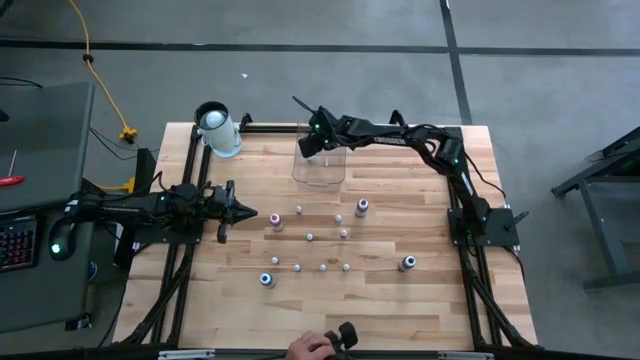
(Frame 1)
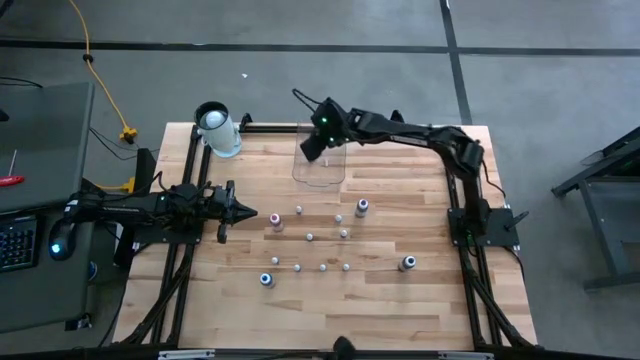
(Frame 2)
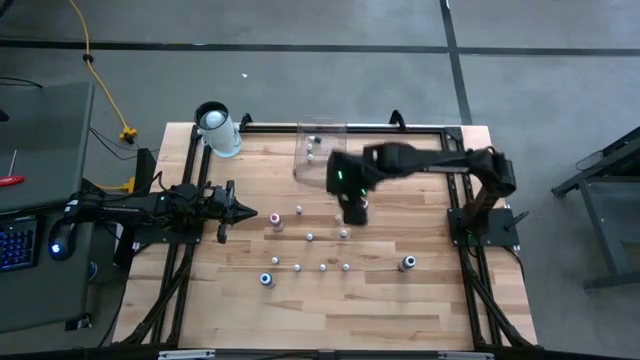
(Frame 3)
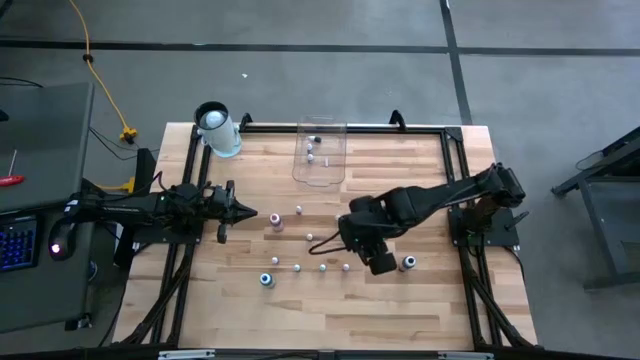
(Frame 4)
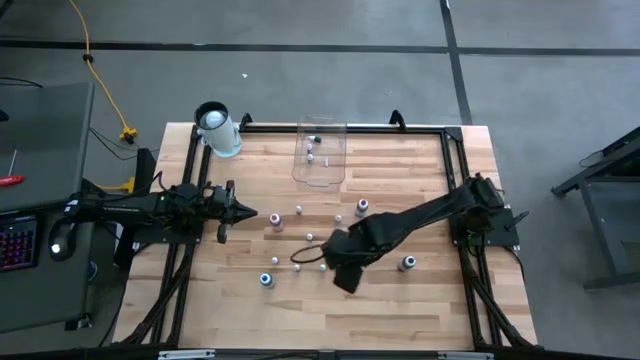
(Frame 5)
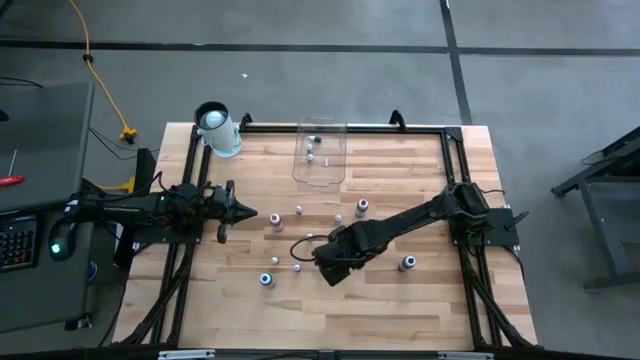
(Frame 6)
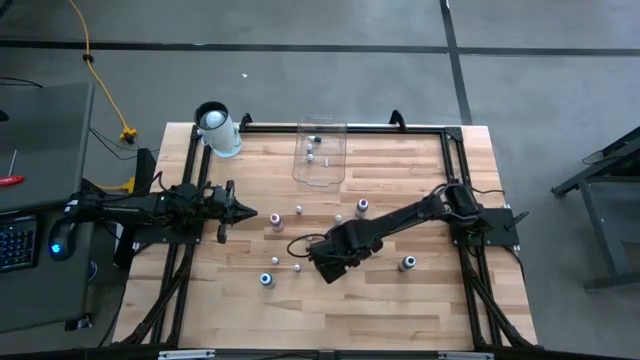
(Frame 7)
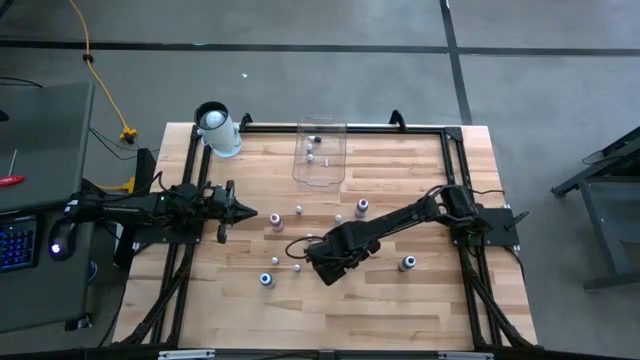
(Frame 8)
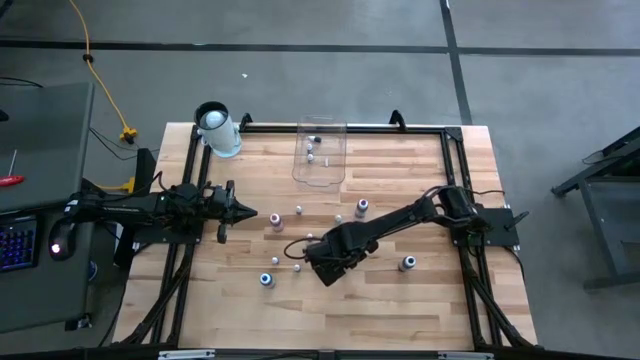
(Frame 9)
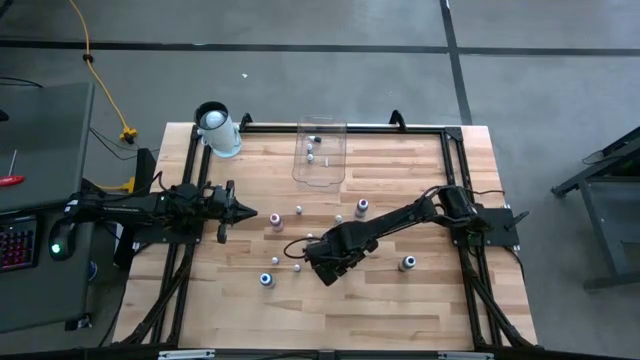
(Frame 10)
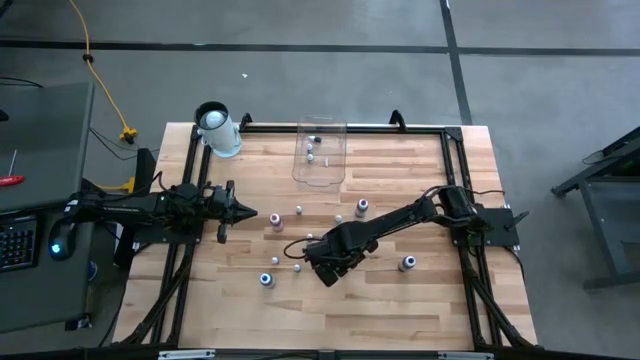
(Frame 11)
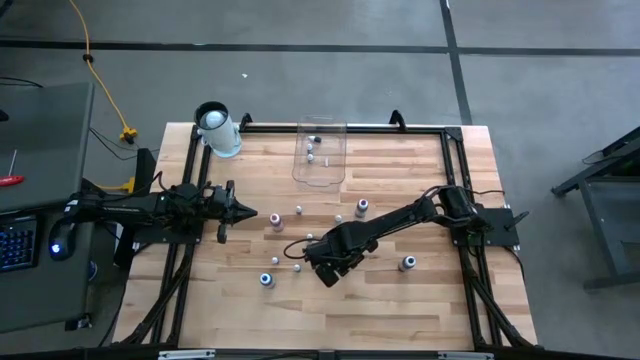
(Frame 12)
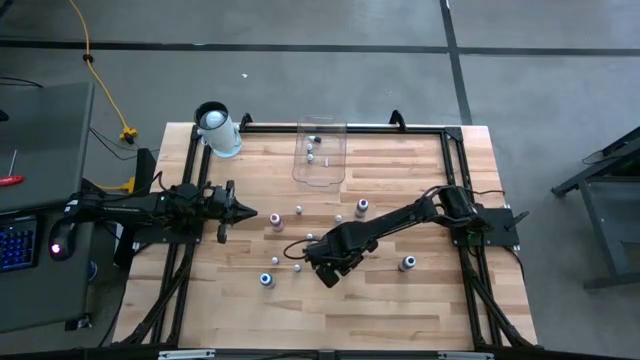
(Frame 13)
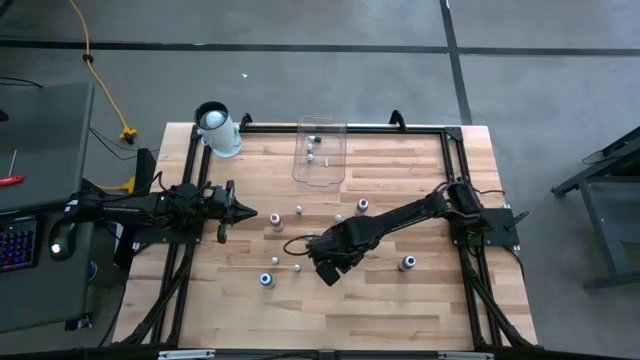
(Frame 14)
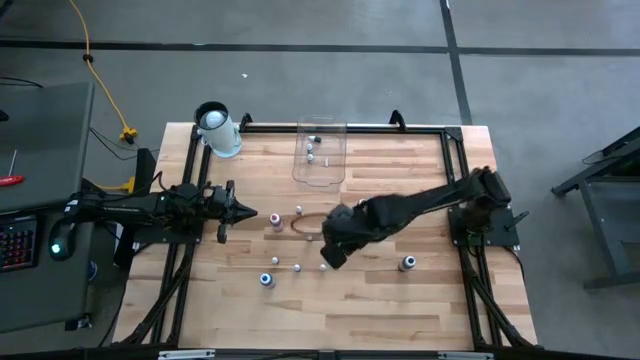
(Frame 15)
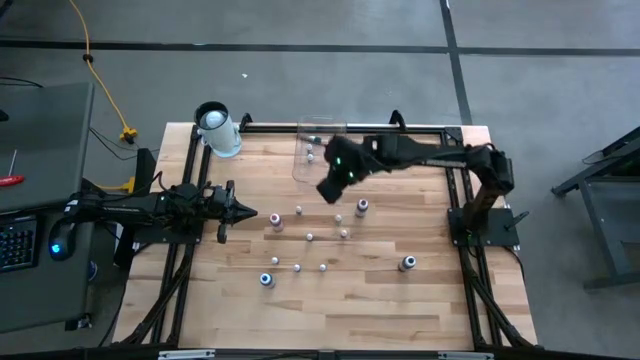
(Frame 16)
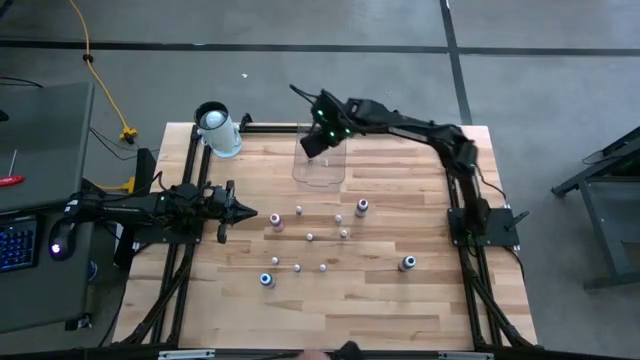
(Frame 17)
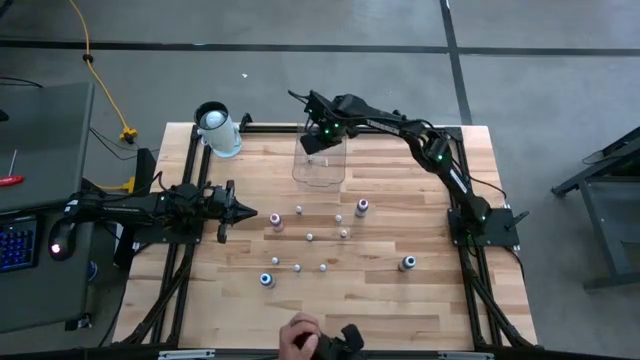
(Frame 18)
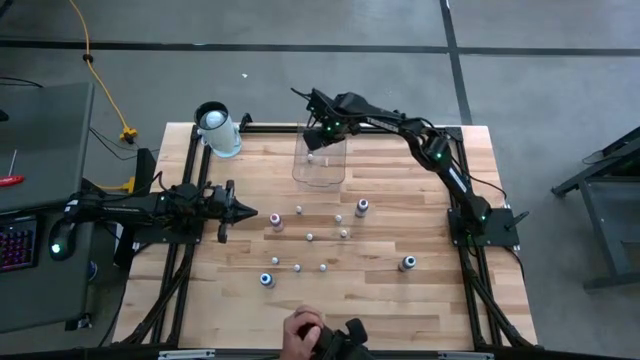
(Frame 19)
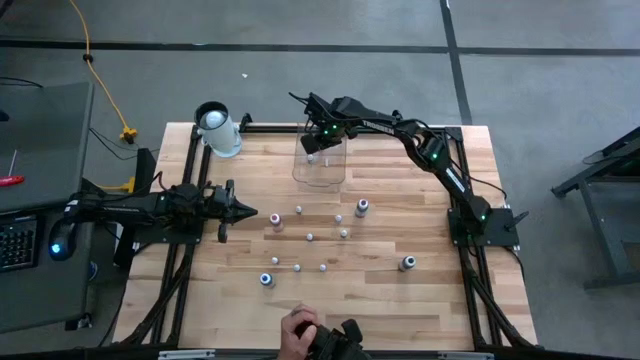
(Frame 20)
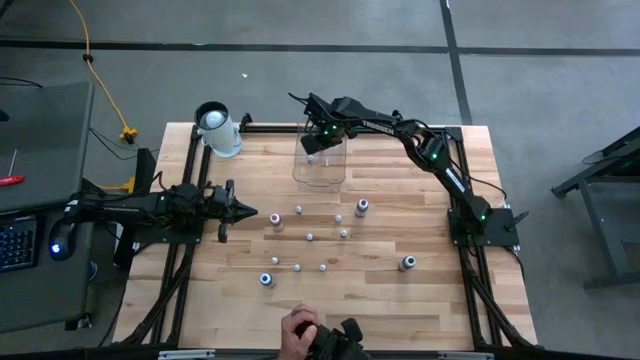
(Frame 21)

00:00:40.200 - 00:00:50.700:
Task: Pick & Place food coloring
Put the small red food coloring bottle into the container

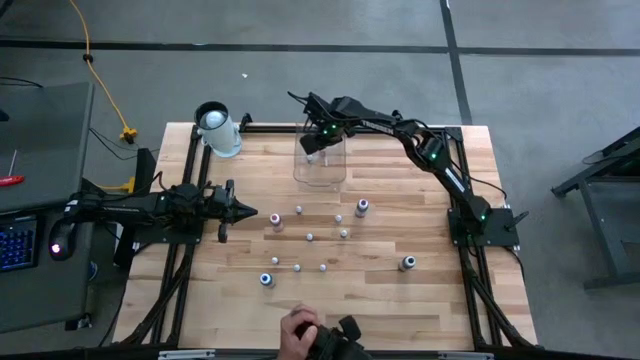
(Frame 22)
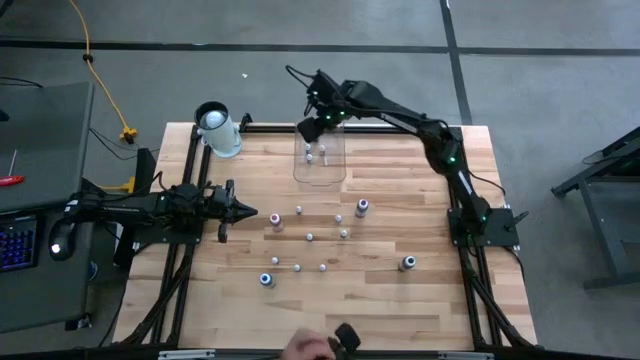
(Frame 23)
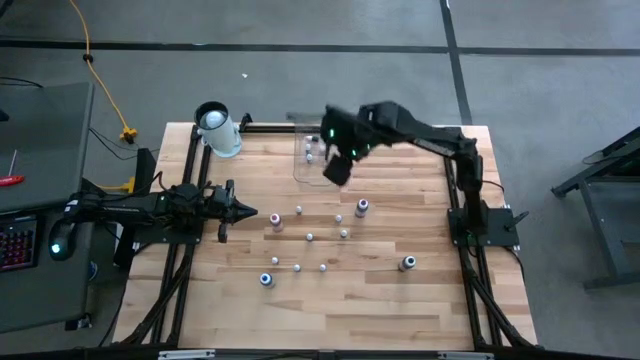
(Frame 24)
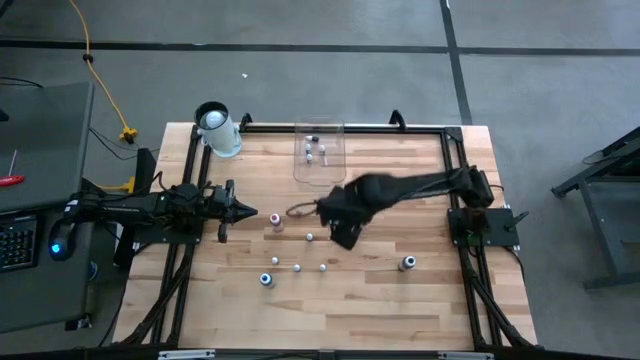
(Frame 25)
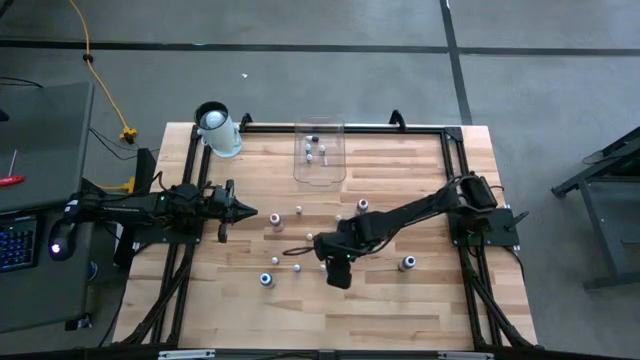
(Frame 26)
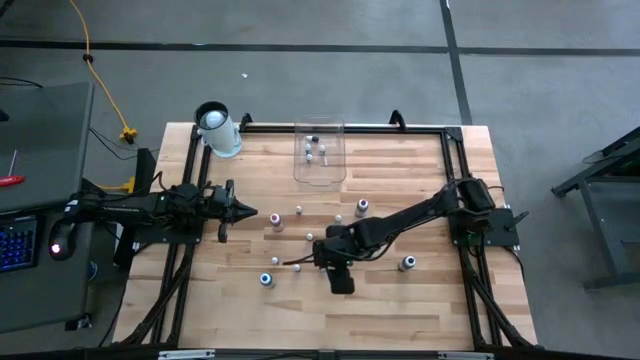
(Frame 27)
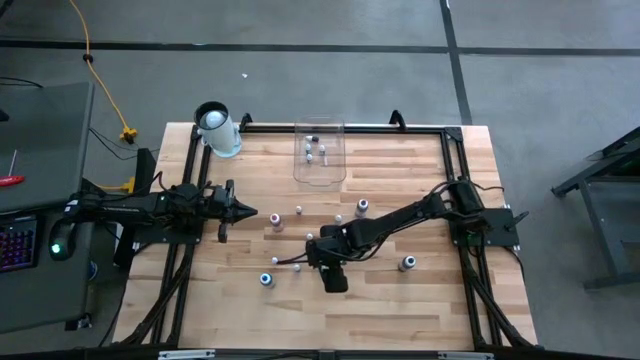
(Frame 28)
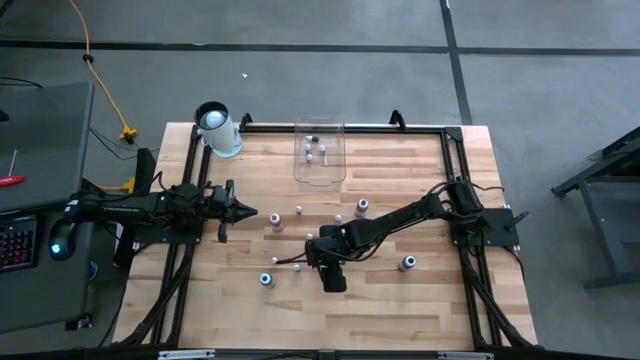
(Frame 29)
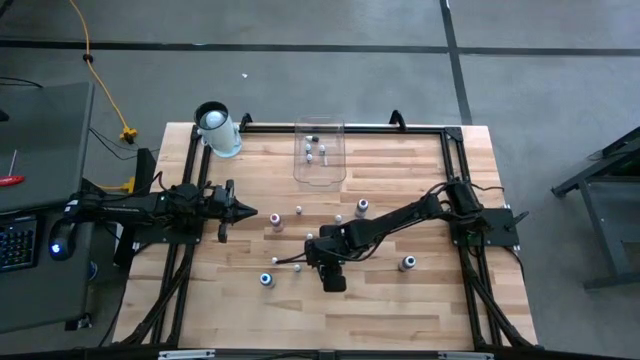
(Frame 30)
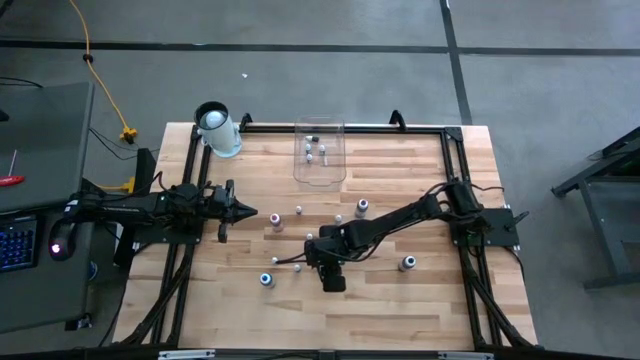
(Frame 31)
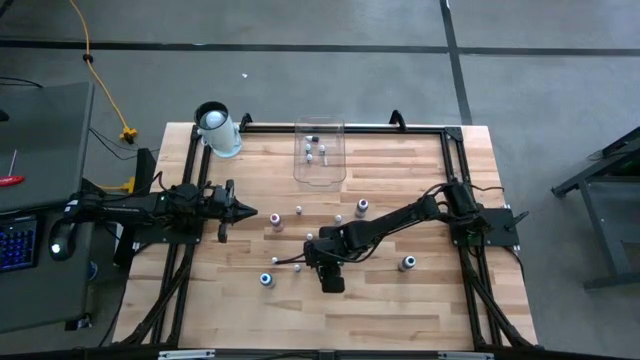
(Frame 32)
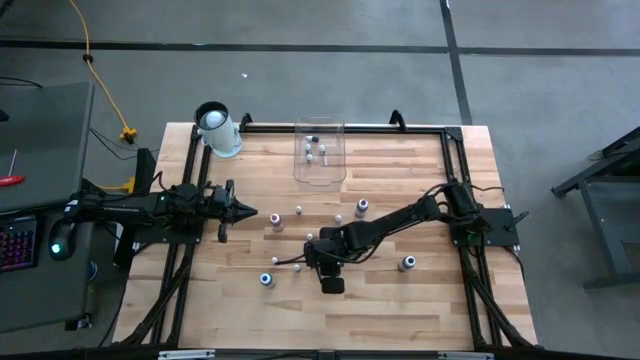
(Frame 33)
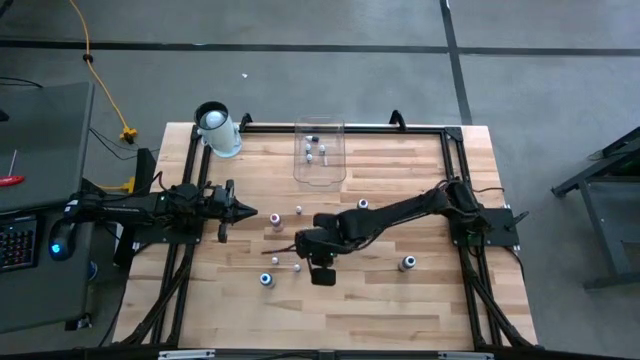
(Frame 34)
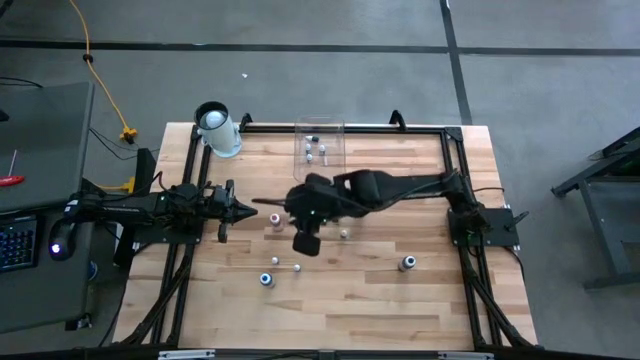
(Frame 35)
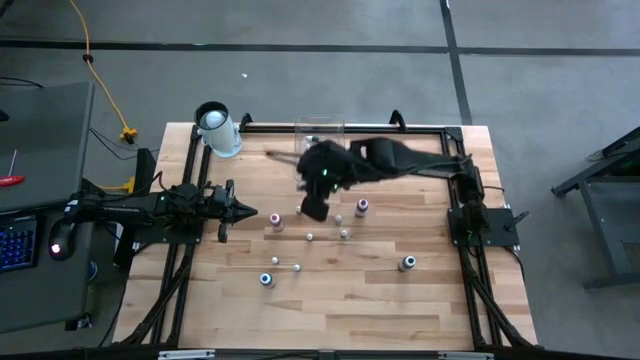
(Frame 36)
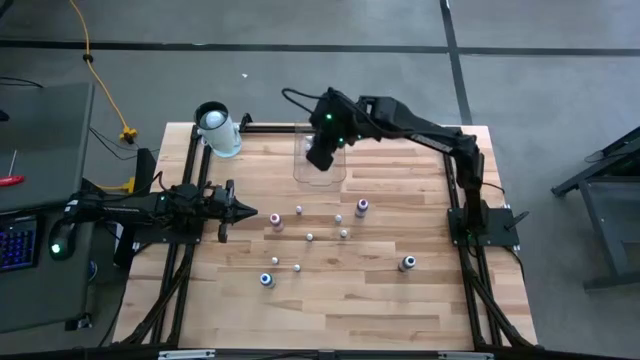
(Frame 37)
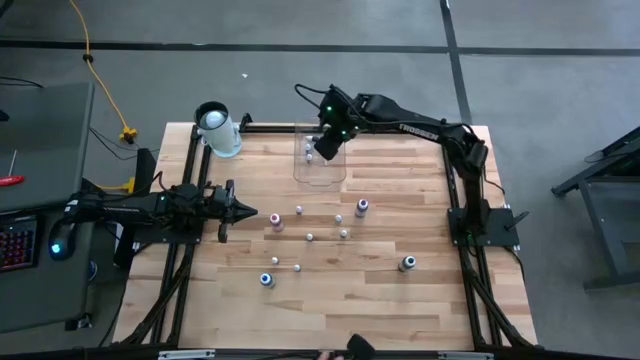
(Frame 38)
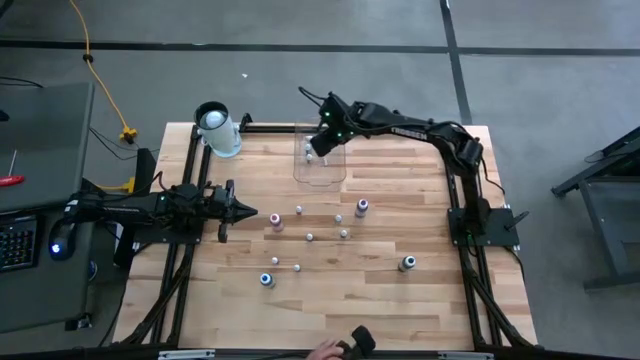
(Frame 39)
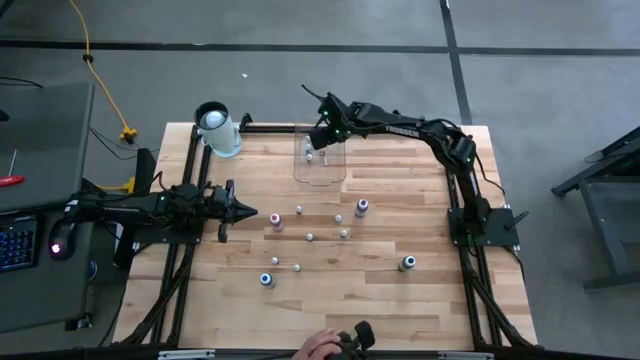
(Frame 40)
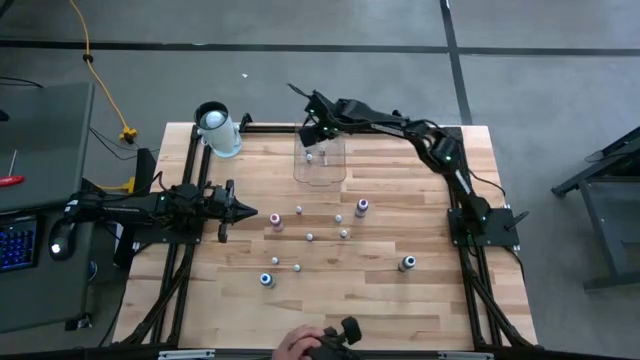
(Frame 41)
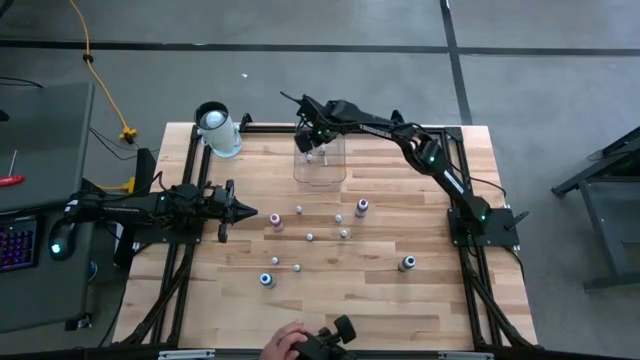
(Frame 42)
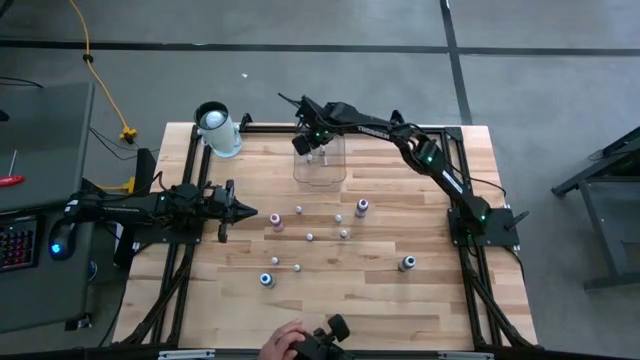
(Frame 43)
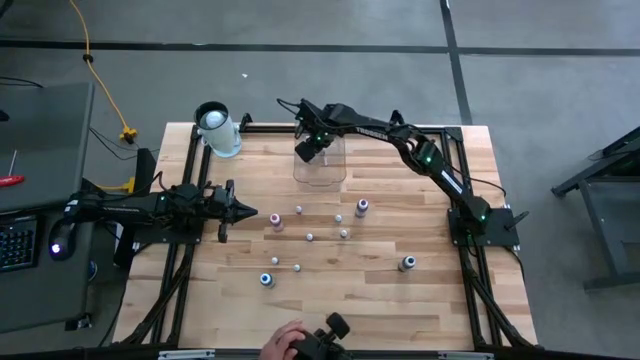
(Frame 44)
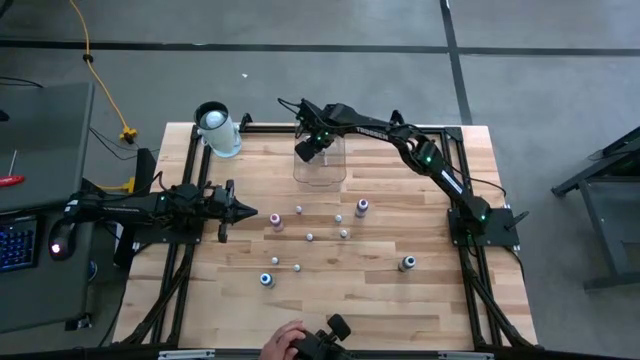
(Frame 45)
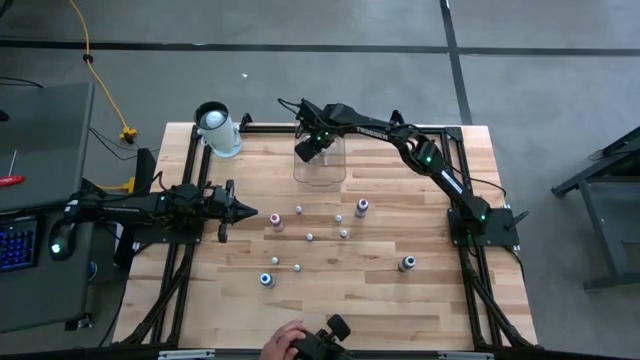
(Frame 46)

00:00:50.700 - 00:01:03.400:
Put the small yellow food coloring bottle into the container
